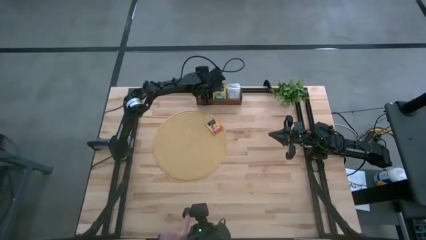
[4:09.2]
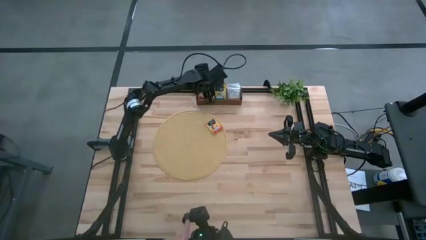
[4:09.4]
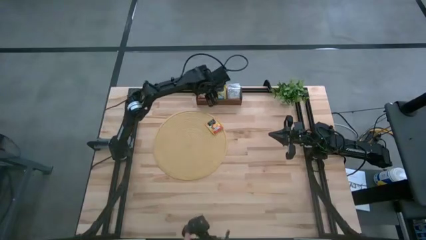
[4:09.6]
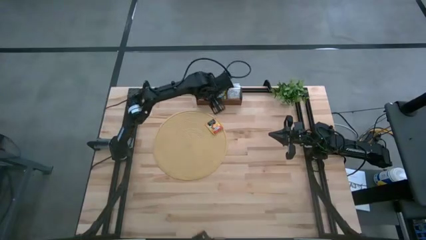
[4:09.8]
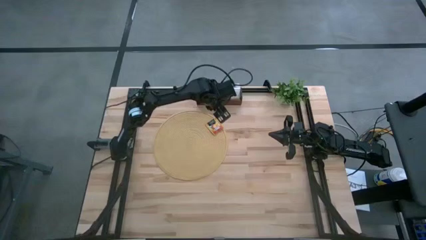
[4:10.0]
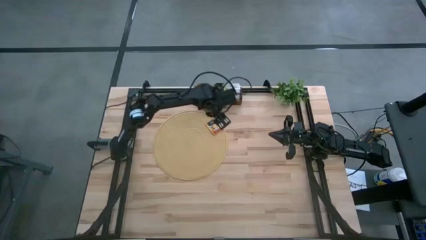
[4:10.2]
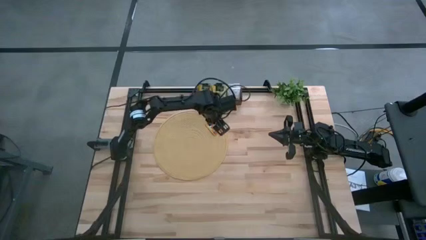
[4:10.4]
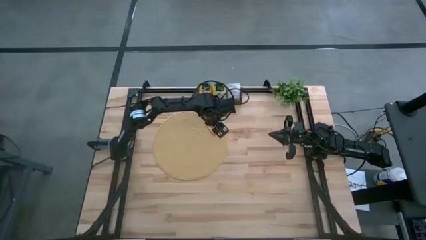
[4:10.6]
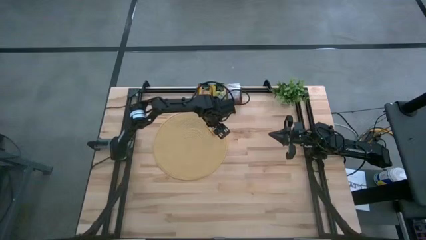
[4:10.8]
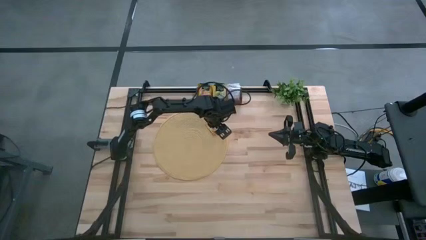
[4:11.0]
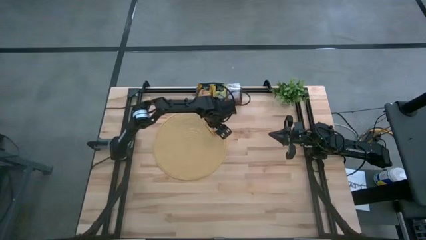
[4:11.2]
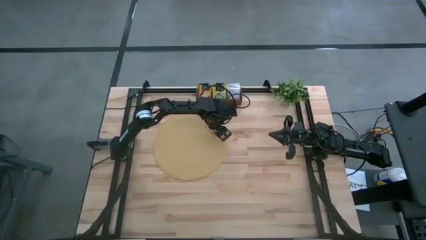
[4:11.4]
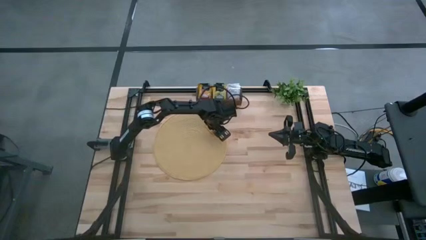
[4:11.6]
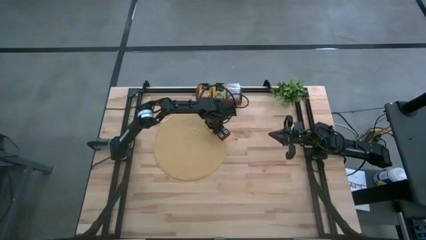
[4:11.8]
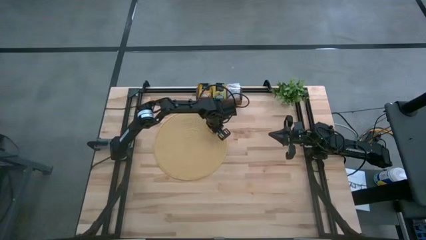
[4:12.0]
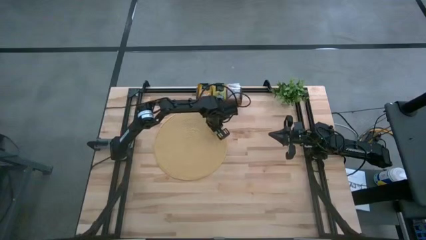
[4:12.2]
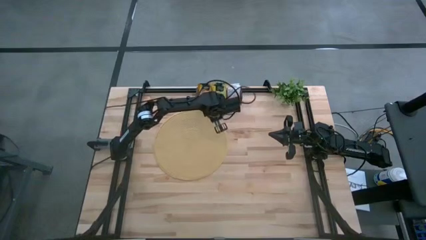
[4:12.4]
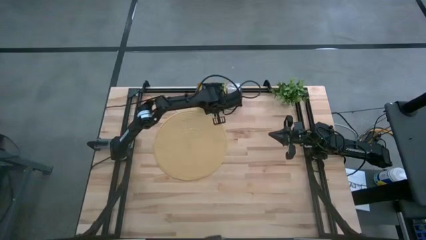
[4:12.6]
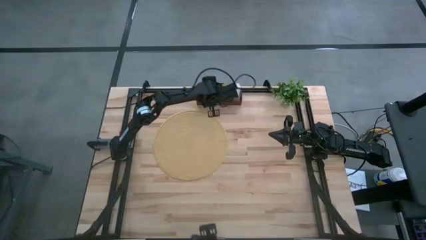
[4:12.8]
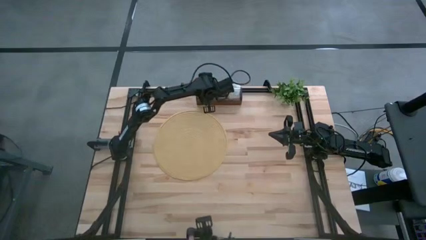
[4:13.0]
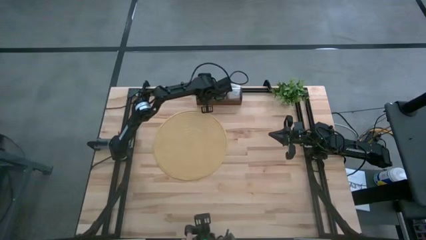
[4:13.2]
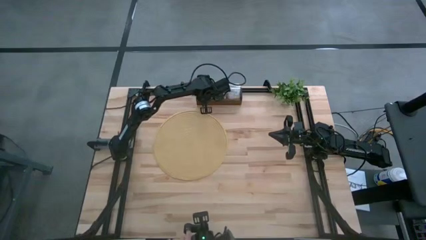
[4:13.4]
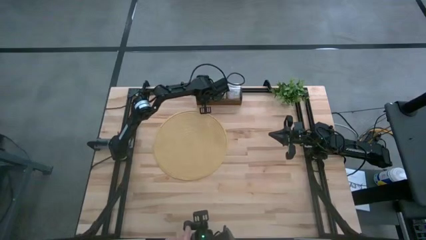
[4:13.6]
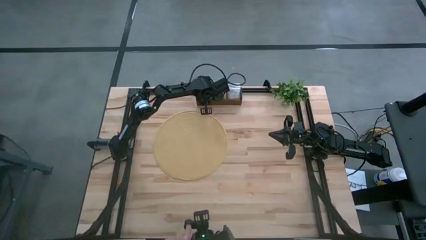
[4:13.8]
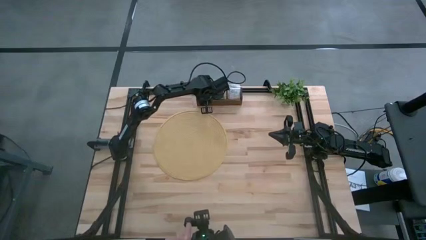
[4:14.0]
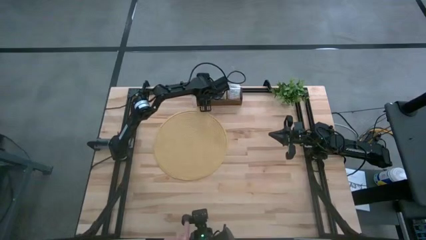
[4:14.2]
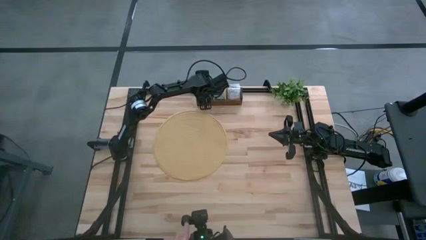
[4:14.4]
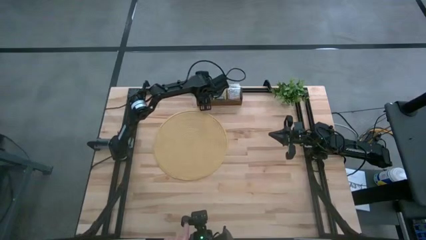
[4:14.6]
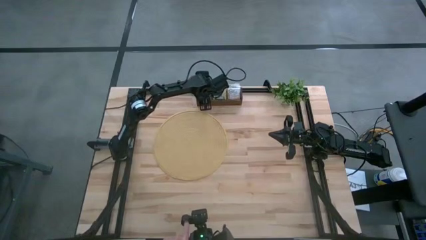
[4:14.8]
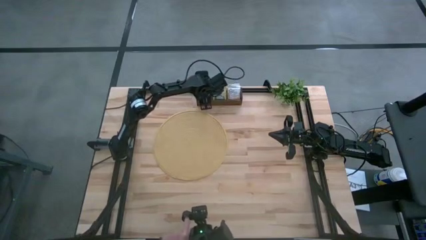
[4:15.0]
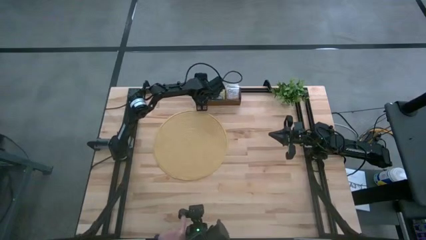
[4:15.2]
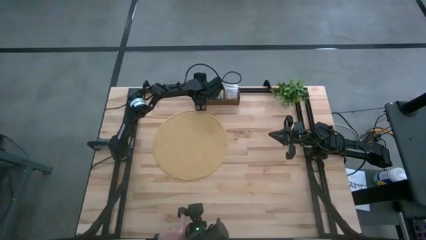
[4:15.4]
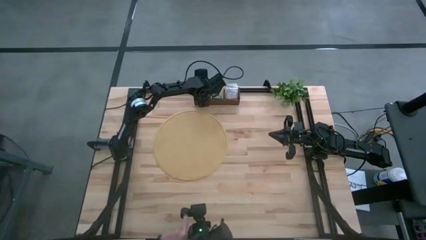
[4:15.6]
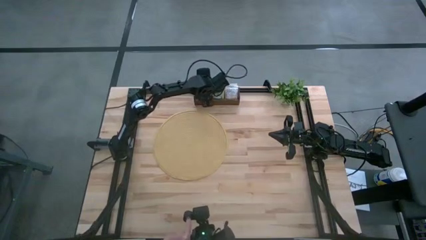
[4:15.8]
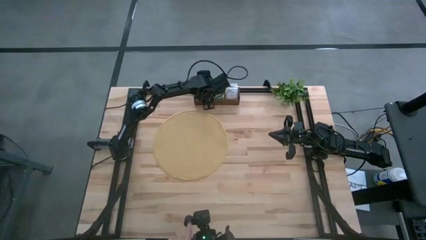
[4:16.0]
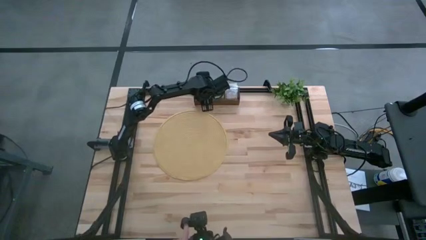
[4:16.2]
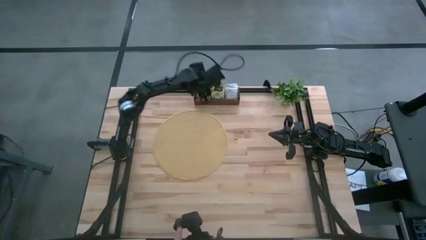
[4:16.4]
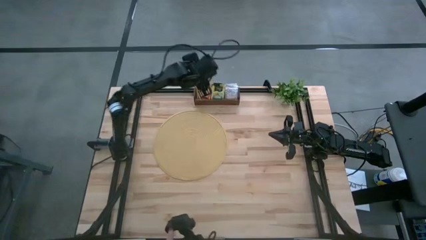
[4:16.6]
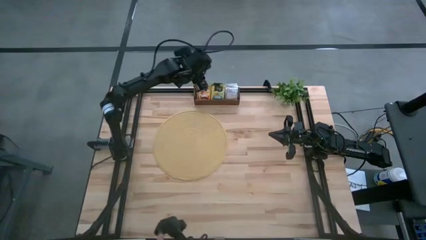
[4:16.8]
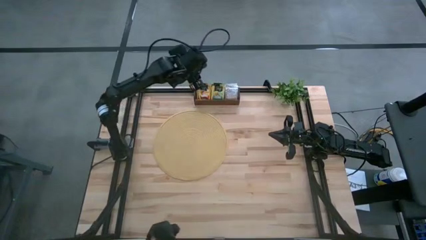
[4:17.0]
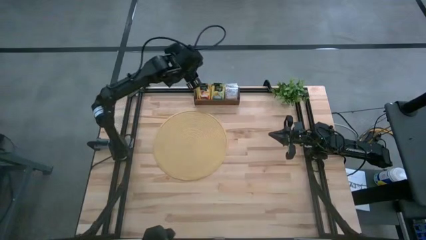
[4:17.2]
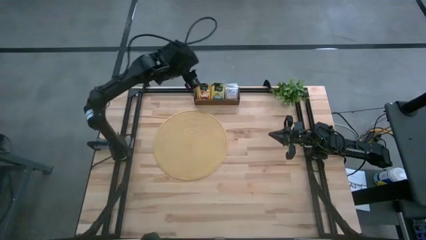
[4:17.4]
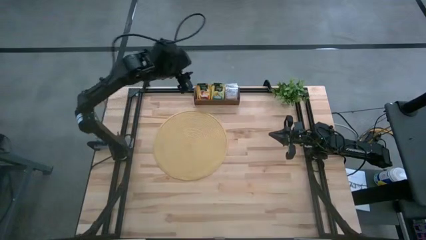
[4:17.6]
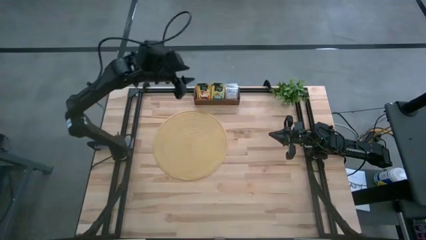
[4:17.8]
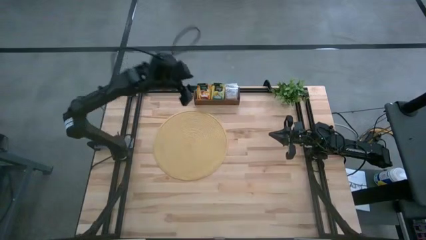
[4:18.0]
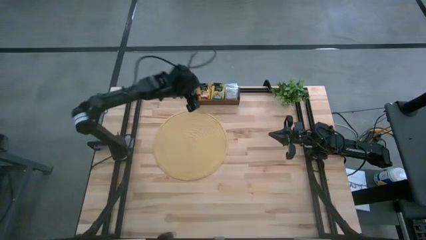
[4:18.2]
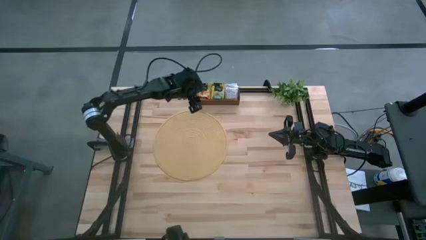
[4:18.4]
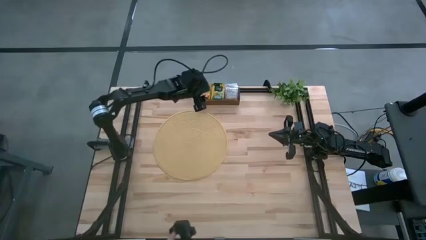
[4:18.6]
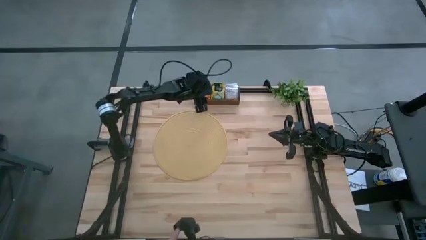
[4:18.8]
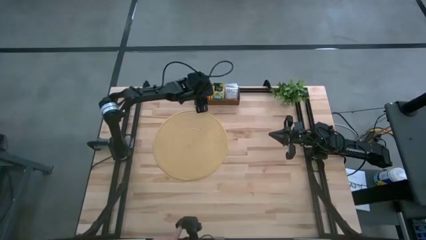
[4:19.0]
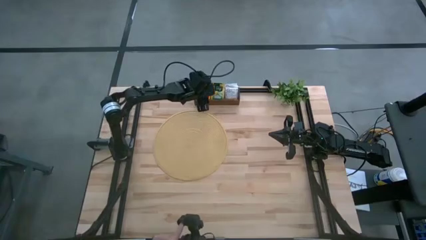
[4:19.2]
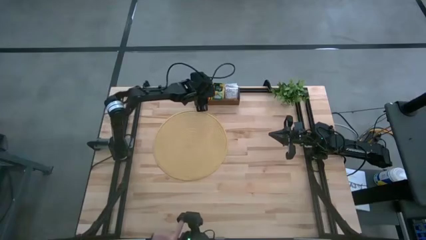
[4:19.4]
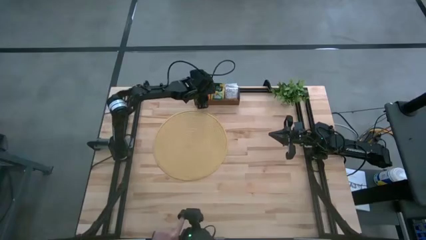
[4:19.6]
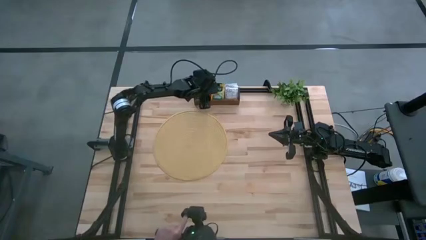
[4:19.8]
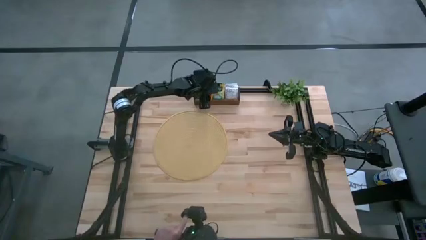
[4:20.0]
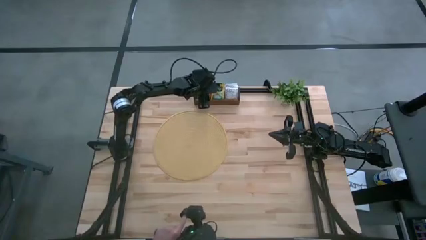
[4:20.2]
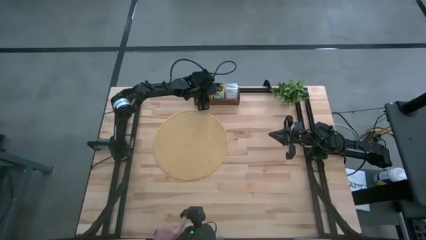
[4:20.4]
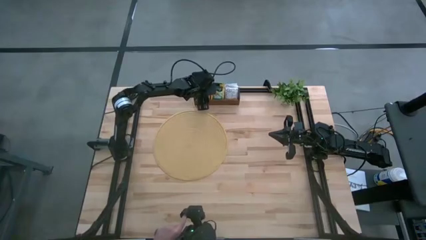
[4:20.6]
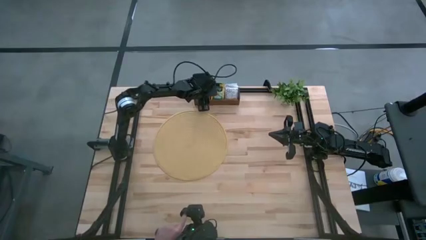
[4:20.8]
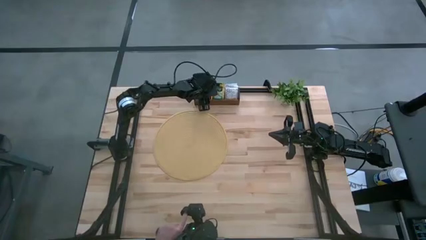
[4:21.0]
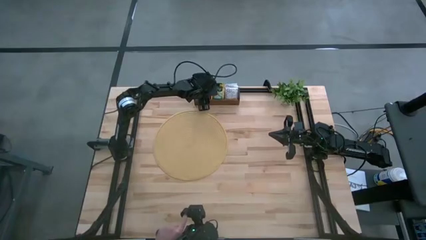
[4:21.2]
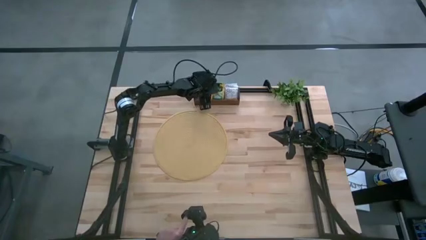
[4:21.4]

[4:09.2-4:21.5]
Task: Pick & Place Tea
Put the orange tea bag into the left section of the wooden organizer

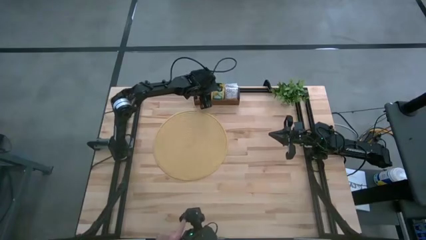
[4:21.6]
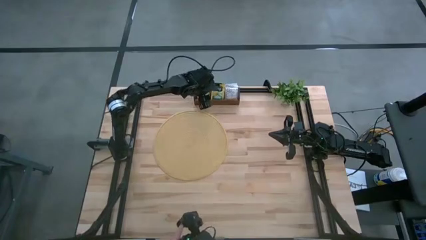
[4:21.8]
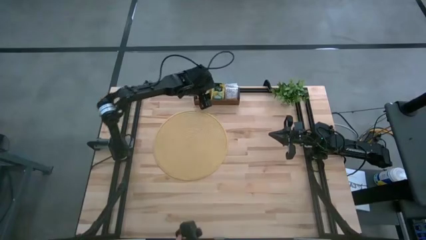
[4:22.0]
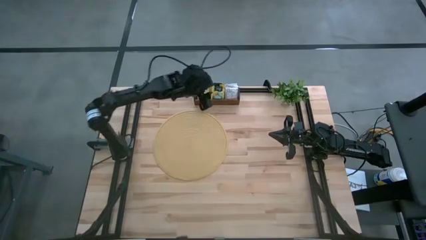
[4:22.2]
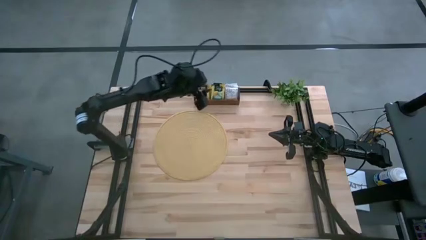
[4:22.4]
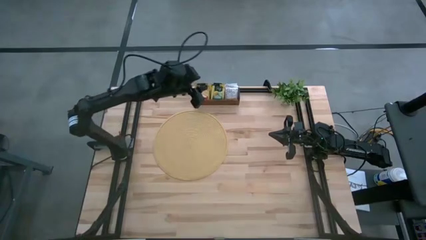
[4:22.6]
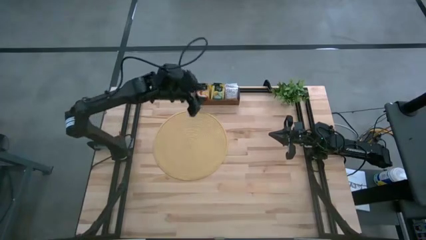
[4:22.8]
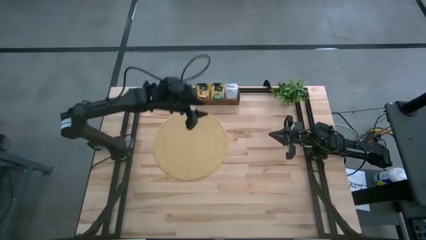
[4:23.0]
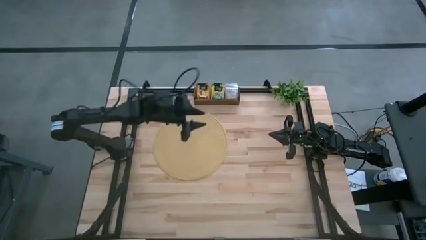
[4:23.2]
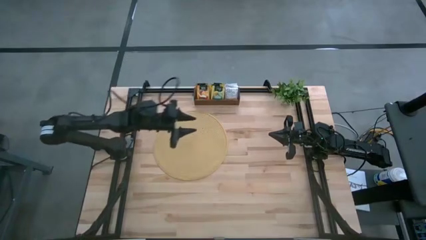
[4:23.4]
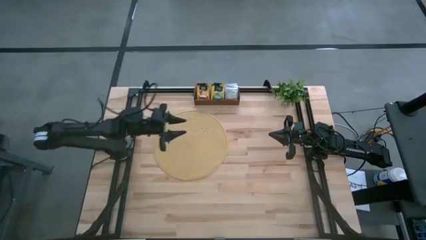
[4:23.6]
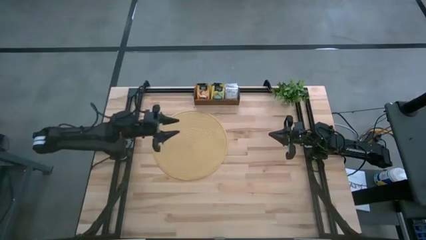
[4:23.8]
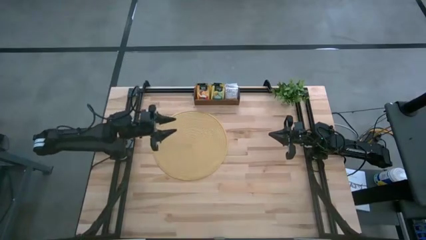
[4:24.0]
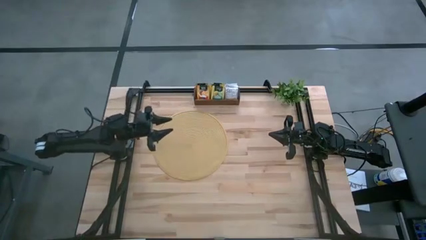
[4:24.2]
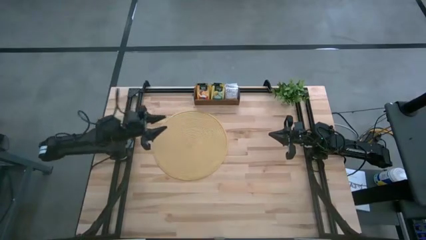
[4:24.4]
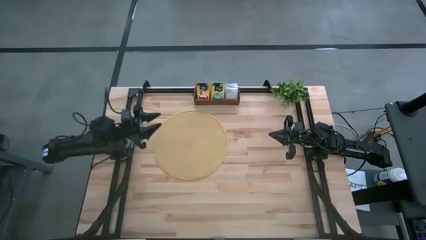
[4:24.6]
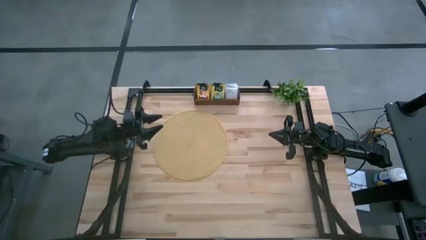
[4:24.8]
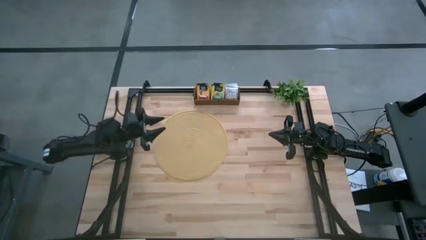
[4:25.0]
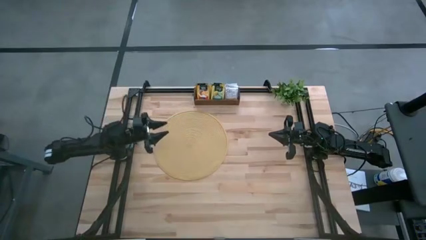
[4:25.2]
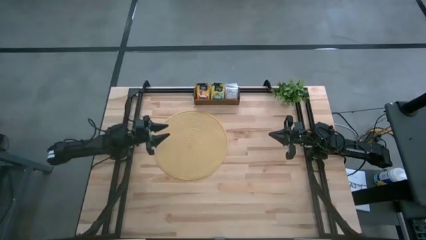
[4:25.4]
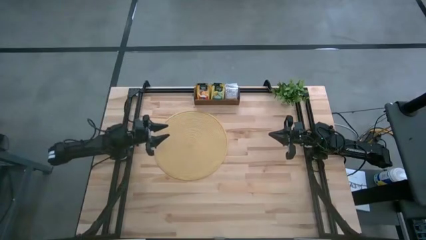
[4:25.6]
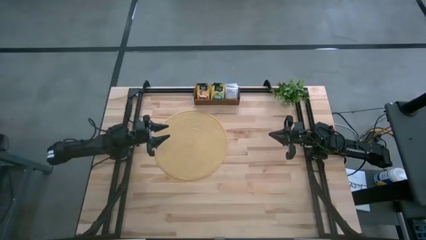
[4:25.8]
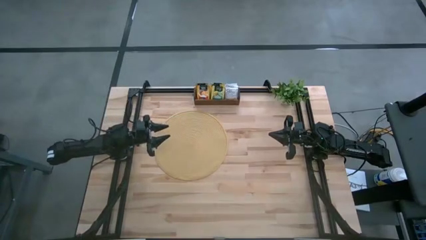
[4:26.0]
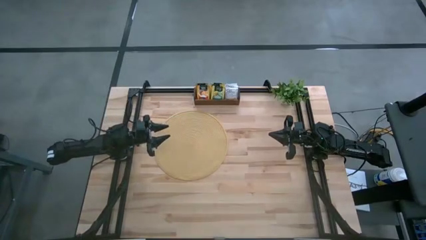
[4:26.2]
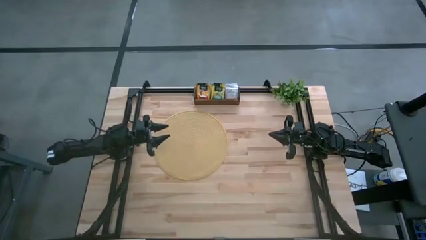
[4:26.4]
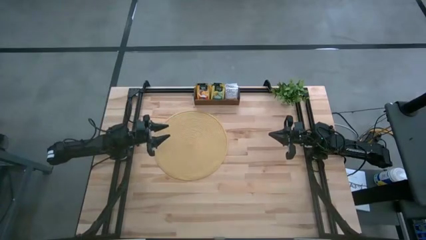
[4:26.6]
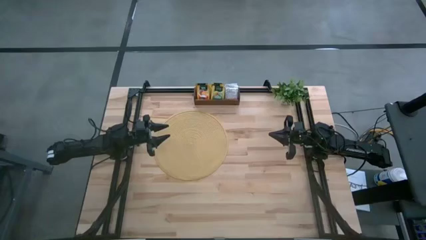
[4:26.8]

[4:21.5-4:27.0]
Return to Home Position
